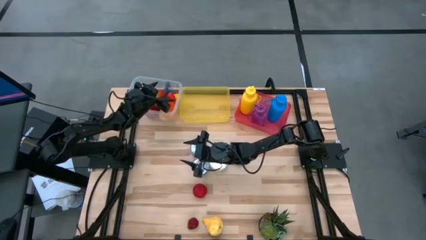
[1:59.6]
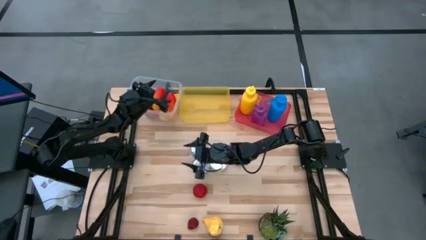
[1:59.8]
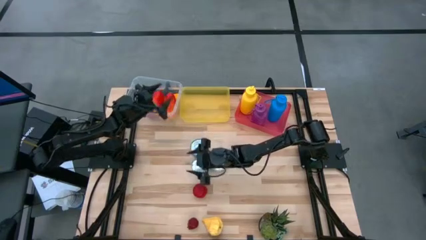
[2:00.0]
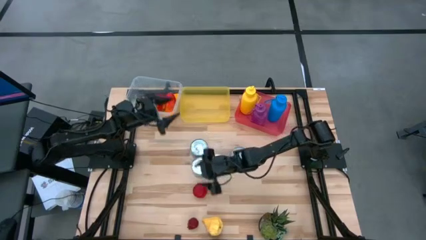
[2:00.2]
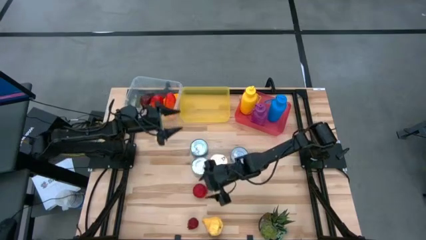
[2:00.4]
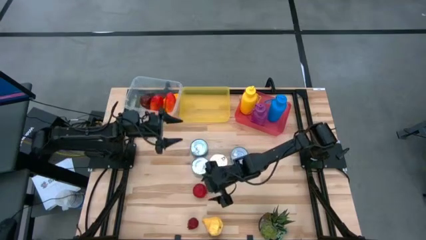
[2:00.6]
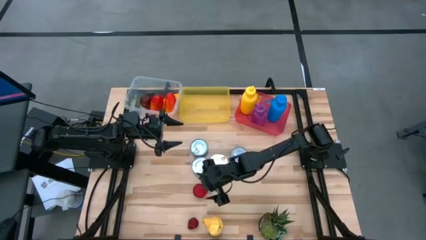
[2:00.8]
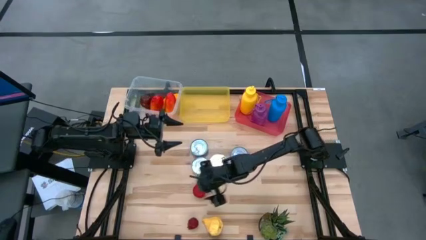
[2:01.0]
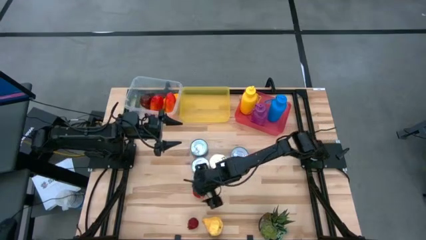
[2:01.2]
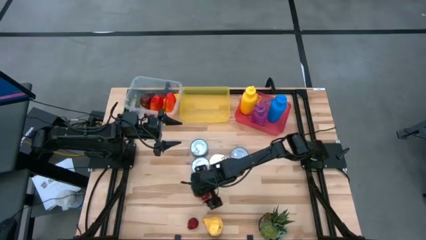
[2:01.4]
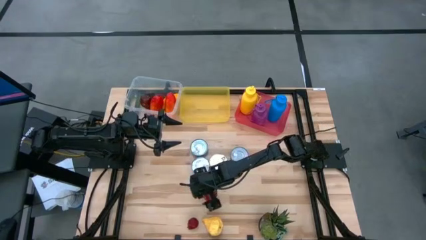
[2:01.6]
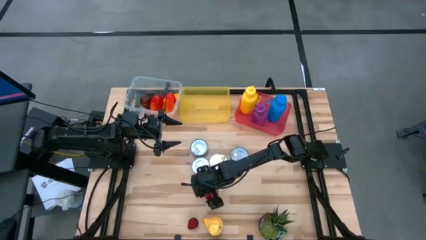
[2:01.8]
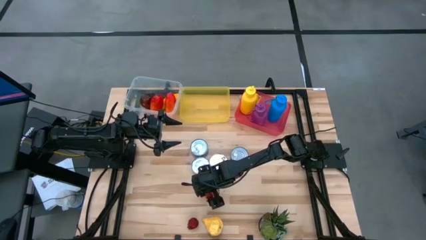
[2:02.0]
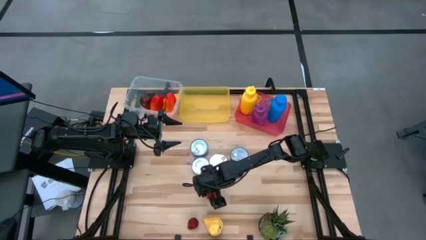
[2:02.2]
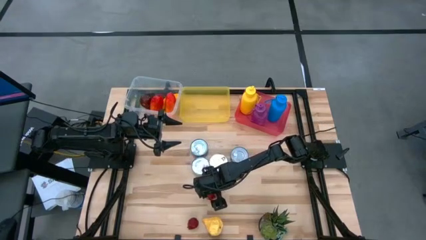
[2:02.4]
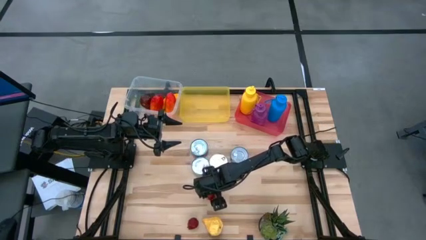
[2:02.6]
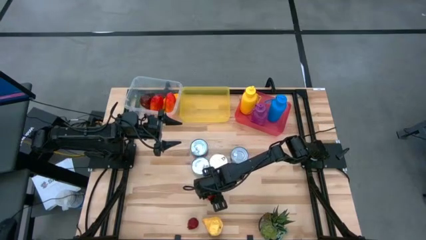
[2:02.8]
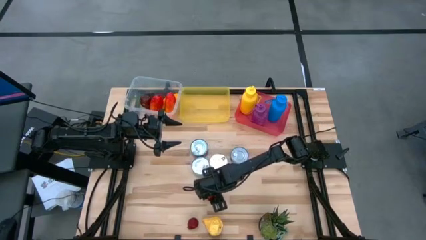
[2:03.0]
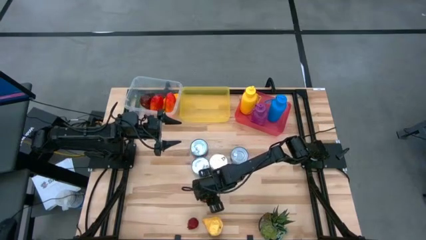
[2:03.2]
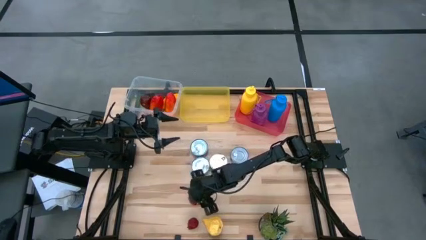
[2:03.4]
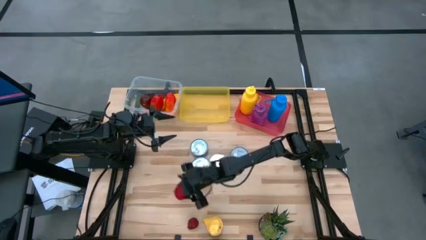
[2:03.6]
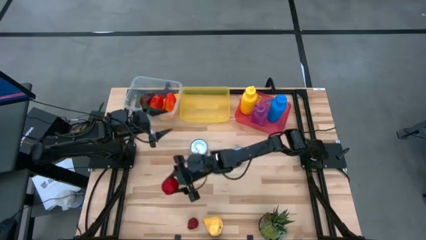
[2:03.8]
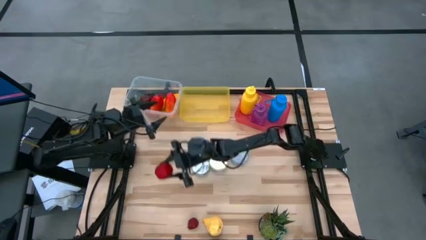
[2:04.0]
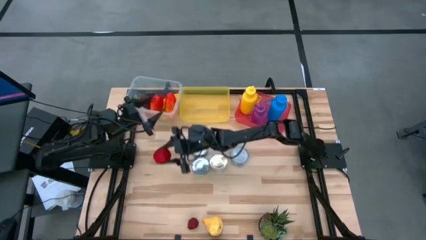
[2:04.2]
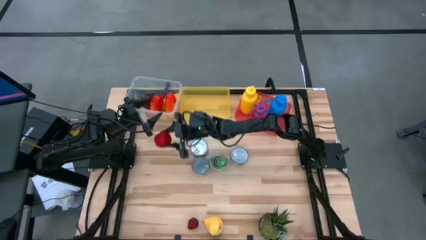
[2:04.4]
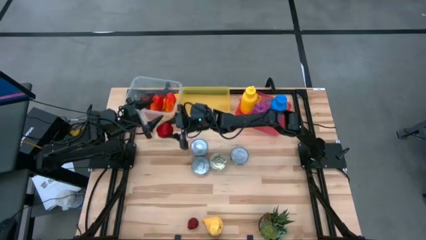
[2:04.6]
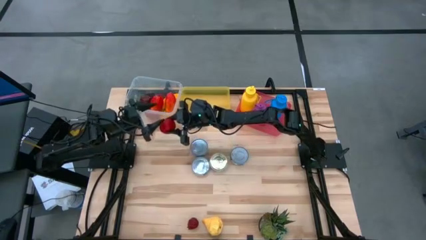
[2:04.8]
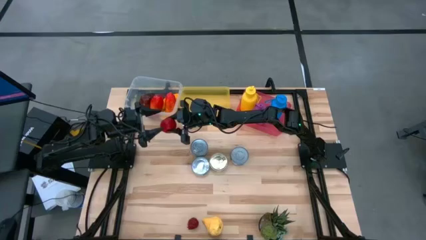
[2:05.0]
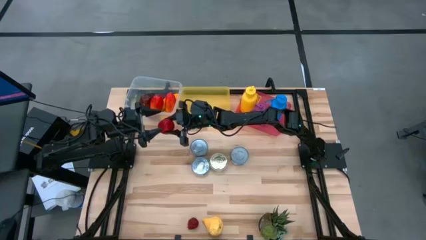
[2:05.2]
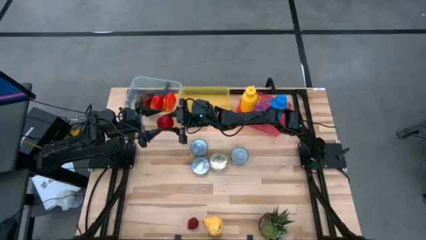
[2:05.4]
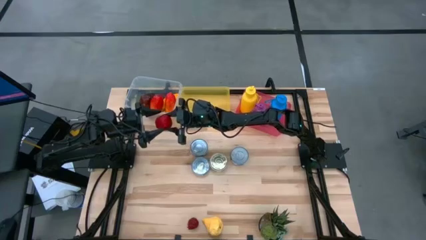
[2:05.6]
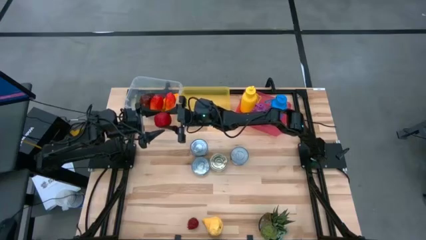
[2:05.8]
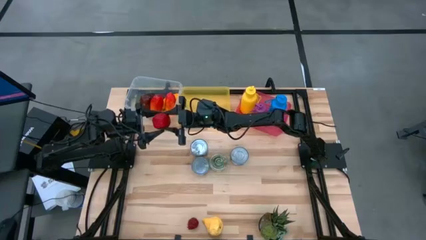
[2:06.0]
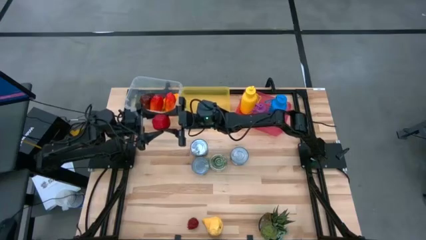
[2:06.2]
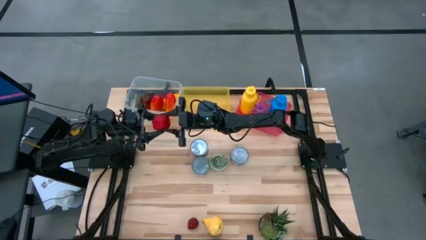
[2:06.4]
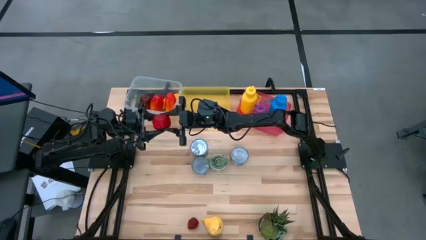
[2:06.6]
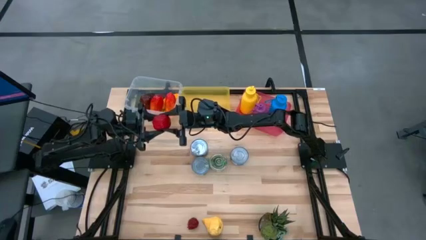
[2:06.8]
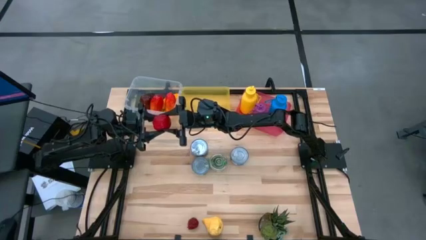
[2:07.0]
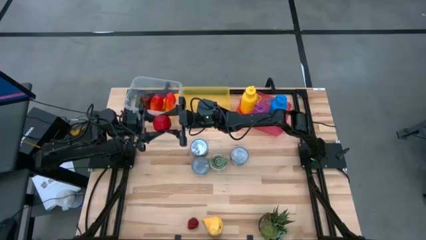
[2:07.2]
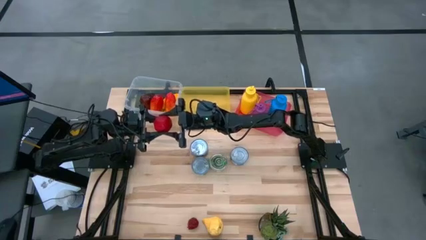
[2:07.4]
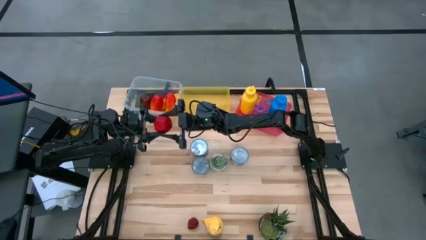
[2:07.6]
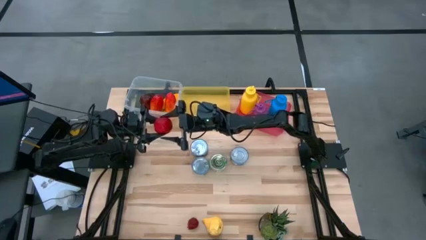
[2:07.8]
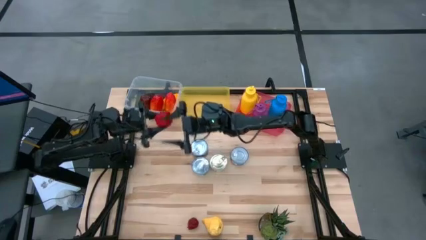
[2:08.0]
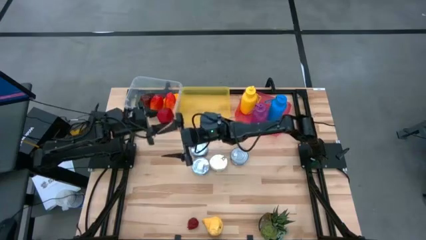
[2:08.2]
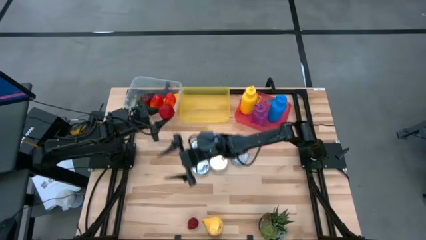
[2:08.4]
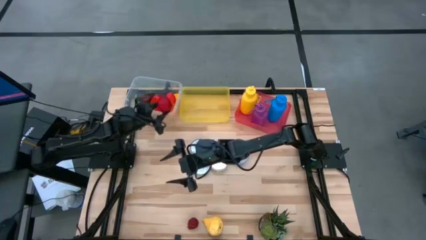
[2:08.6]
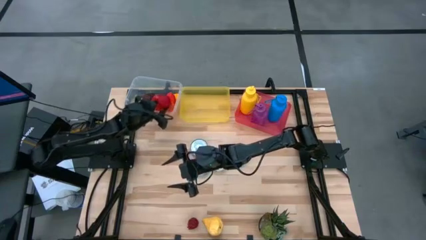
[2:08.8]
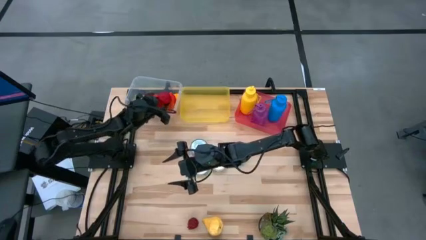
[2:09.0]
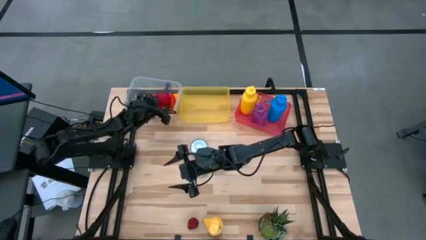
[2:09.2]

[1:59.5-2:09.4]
Task: Pick & Place Food Item
Put the red apple into the transparent bin

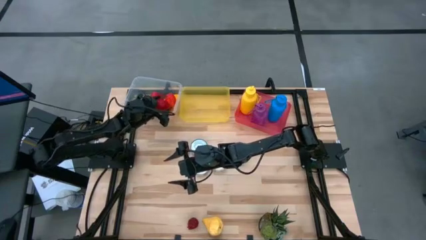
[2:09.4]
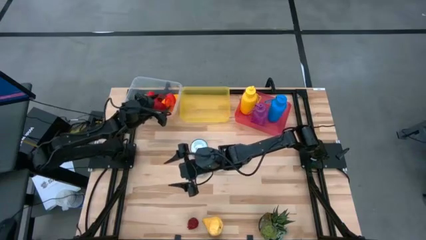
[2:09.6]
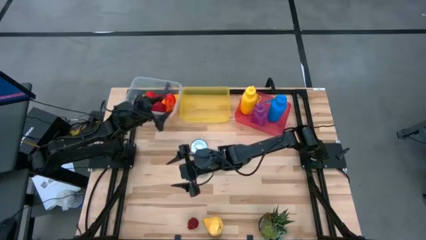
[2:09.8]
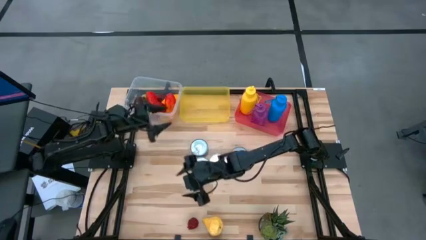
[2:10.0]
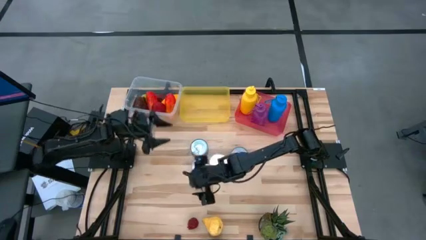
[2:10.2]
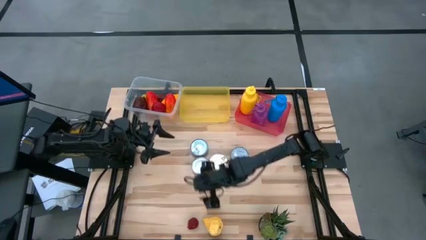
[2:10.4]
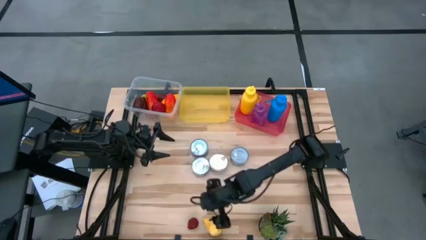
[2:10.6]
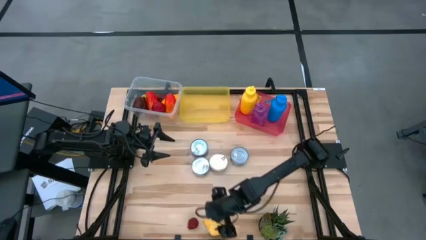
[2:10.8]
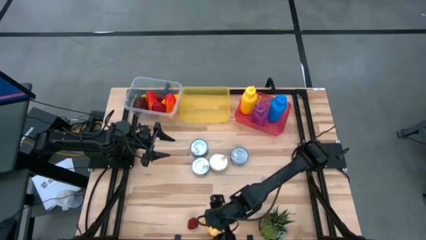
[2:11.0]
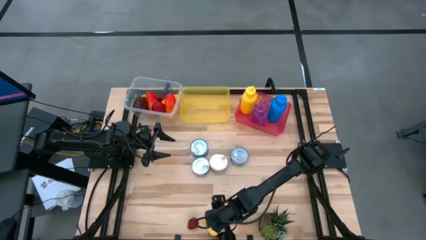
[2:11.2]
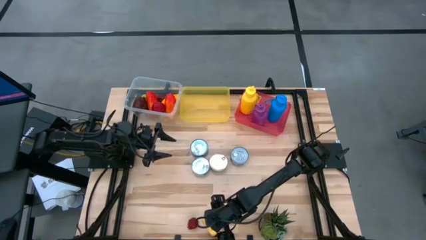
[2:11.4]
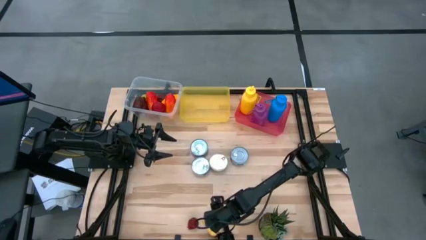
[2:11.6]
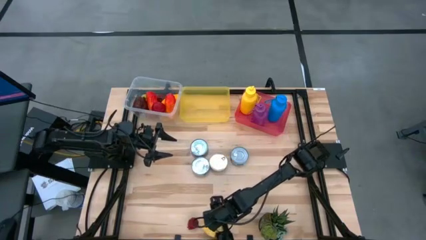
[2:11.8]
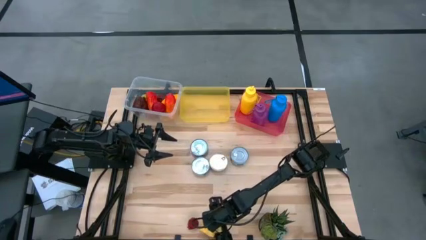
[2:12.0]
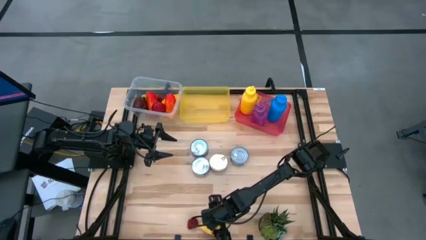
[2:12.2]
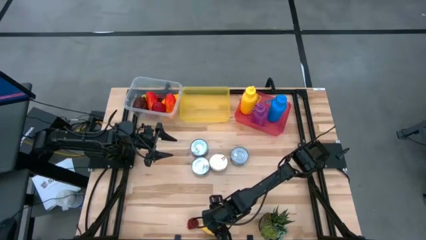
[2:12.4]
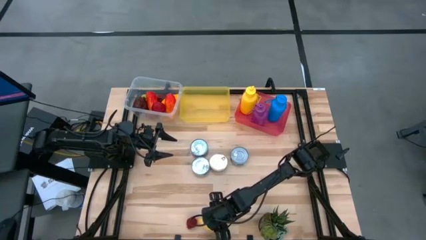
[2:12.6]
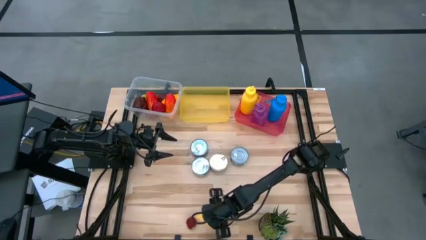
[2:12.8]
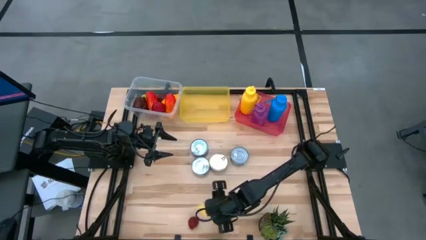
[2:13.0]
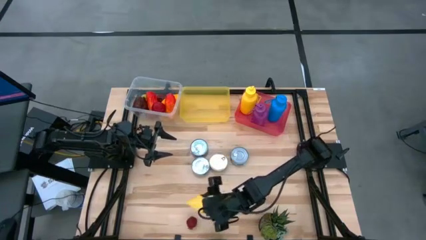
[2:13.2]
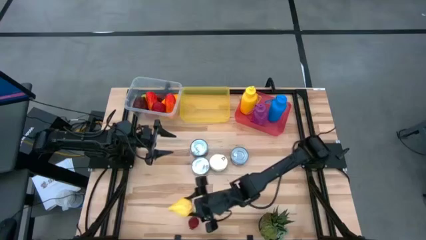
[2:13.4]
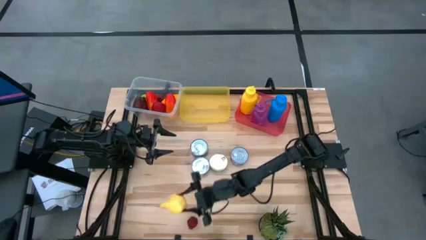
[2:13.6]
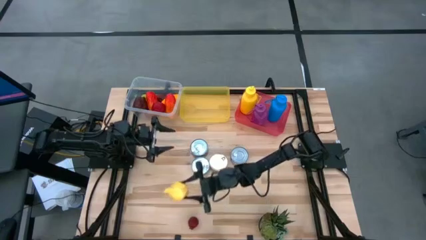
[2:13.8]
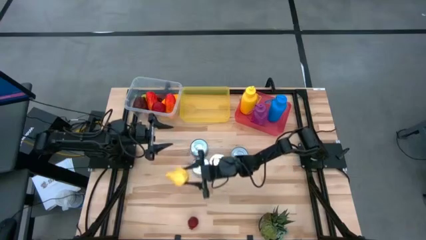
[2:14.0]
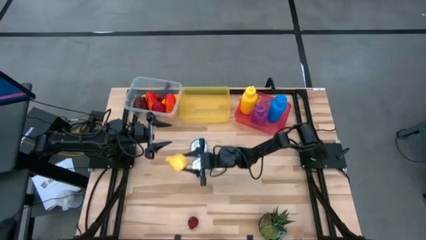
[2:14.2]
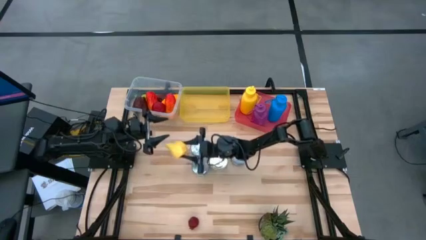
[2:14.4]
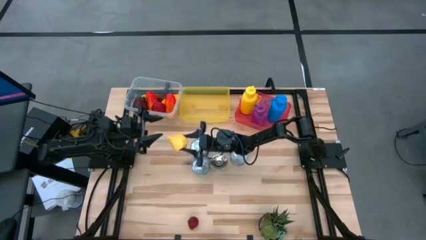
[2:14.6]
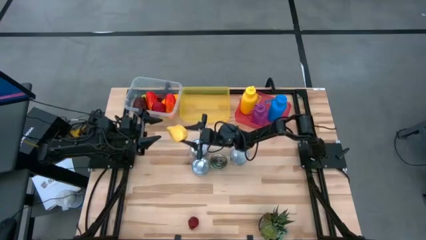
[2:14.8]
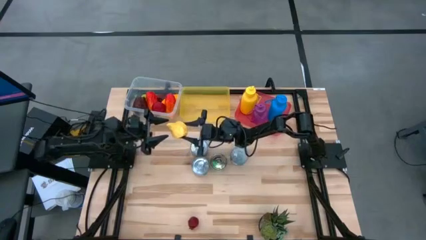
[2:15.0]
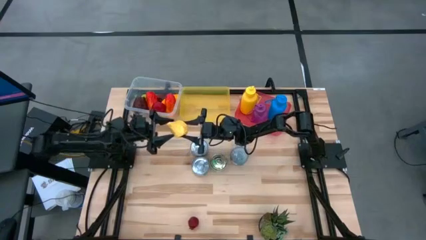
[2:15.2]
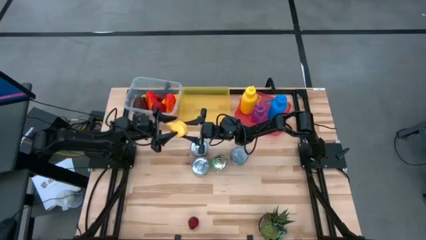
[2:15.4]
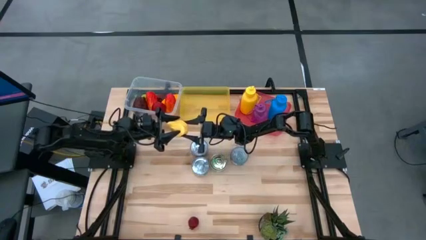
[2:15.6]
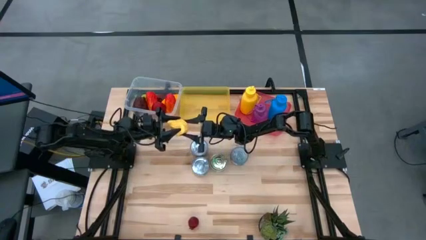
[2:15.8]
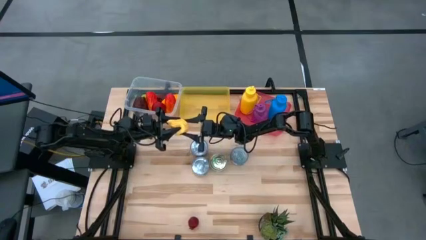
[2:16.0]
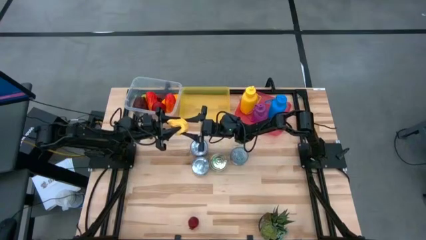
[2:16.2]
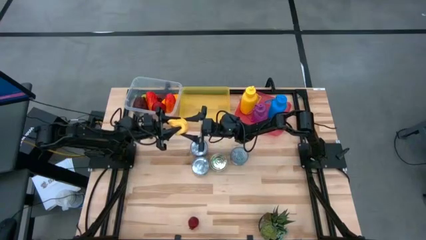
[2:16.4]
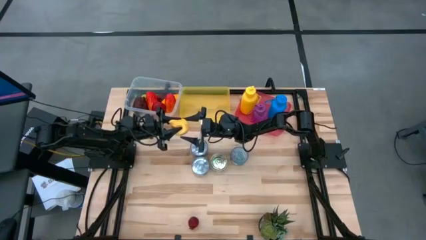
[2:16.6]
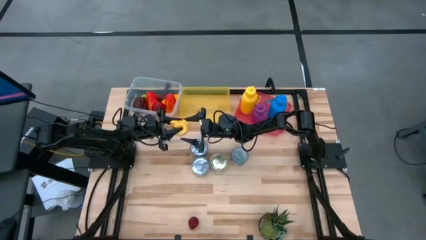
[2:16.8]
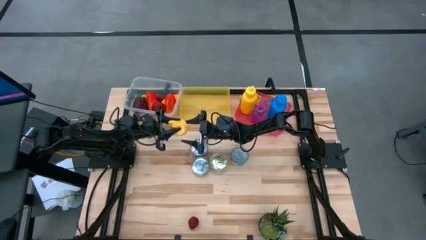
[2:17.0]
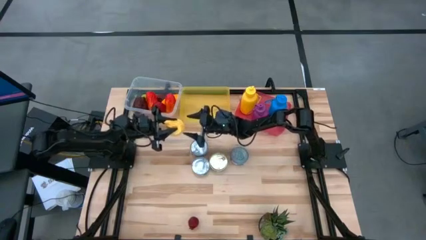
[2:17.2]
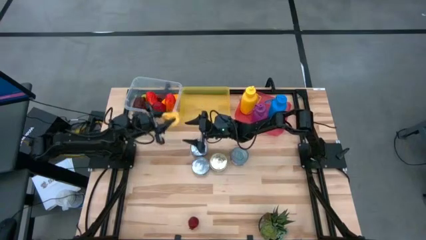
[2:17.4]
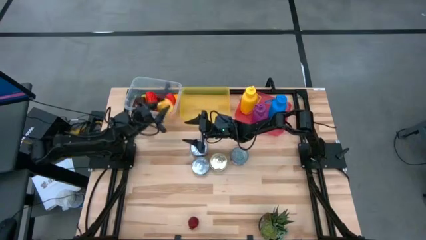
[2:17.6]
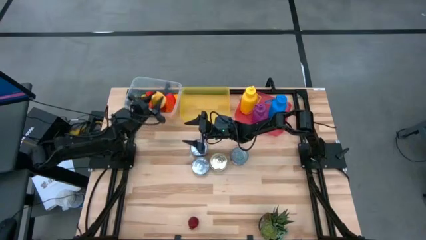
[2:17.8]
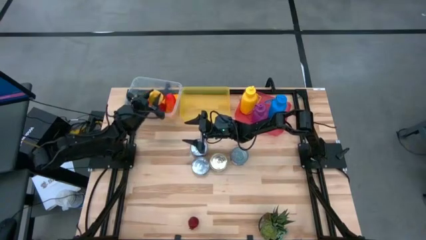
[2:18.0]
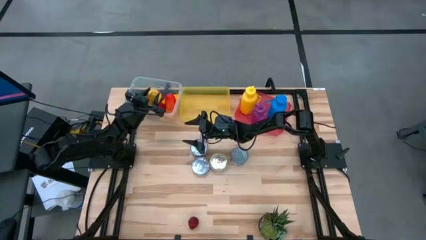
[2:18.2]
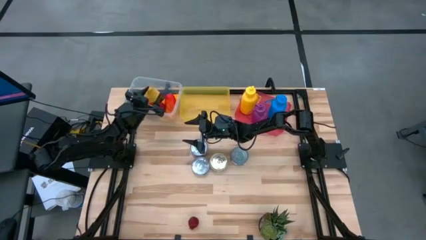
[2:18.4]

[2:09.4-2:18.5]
Put the yellow pear into the transparent bin
